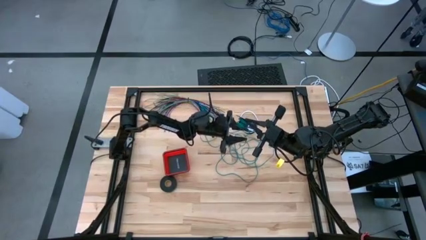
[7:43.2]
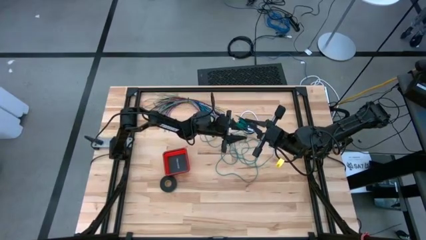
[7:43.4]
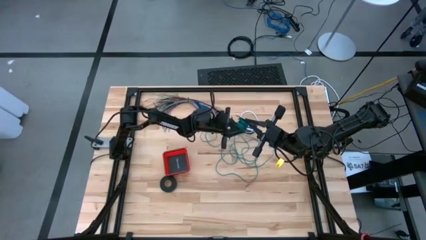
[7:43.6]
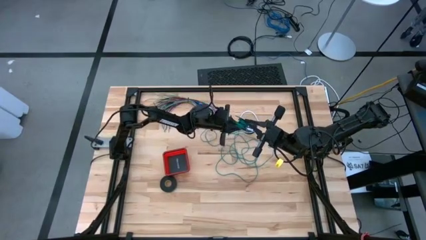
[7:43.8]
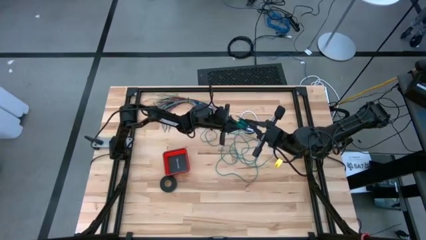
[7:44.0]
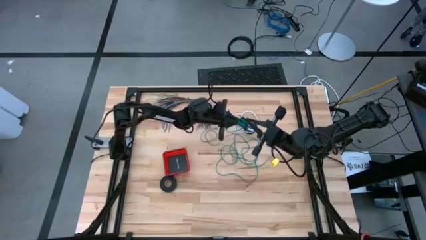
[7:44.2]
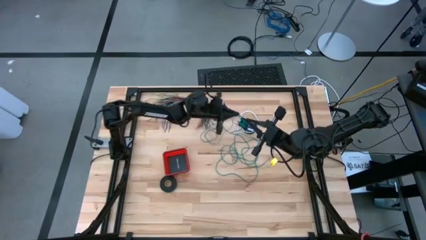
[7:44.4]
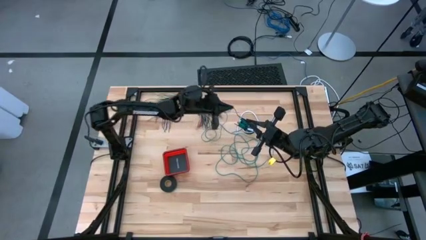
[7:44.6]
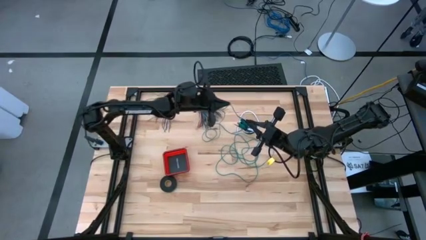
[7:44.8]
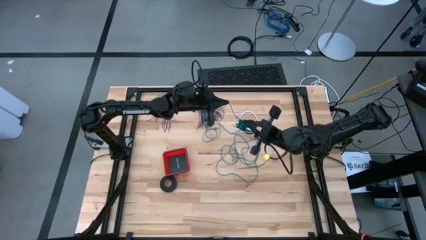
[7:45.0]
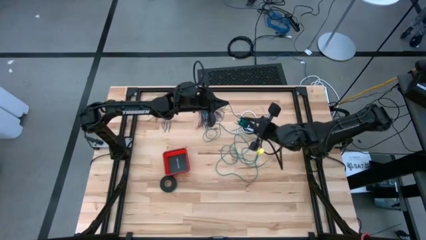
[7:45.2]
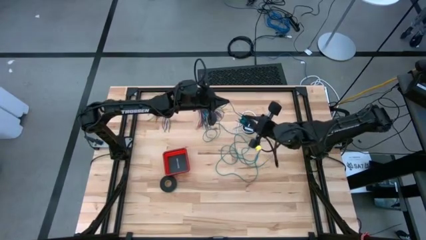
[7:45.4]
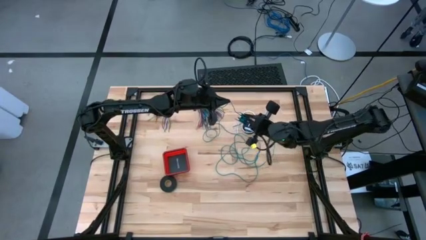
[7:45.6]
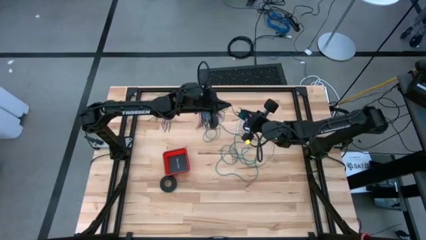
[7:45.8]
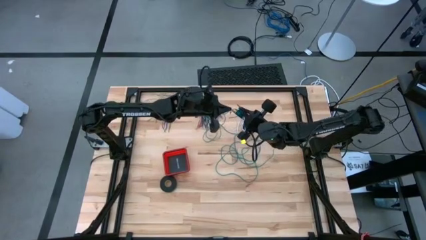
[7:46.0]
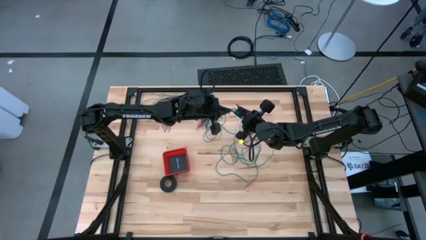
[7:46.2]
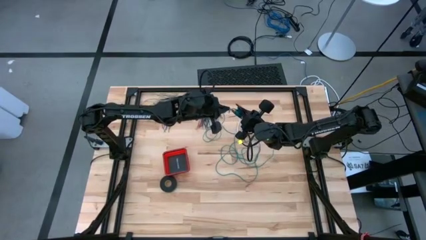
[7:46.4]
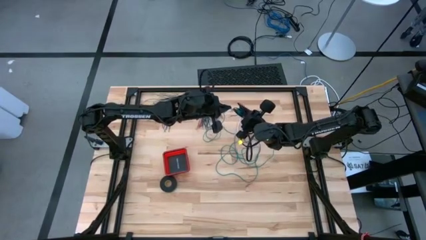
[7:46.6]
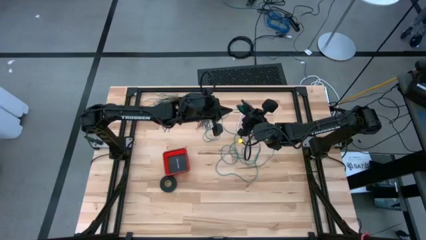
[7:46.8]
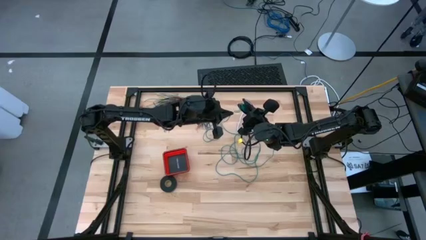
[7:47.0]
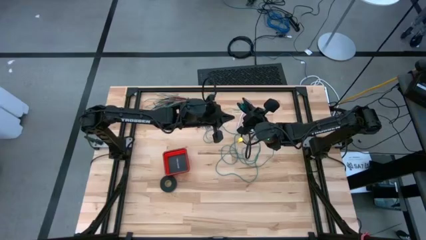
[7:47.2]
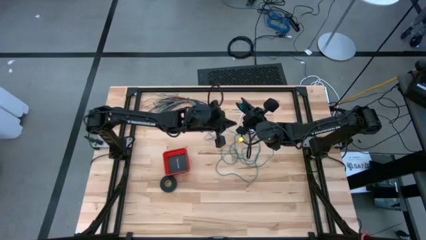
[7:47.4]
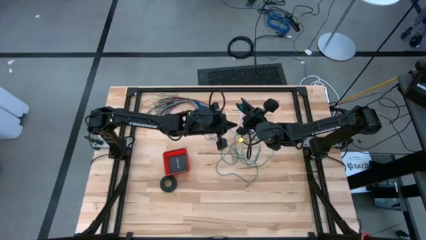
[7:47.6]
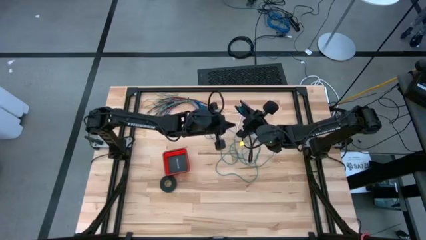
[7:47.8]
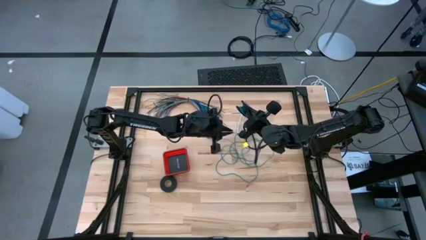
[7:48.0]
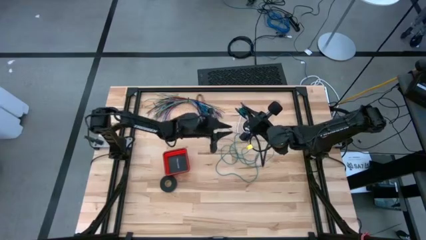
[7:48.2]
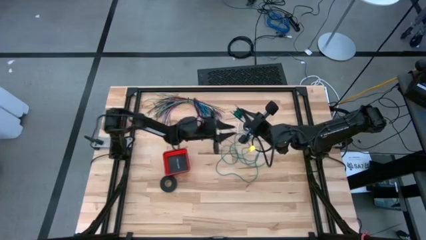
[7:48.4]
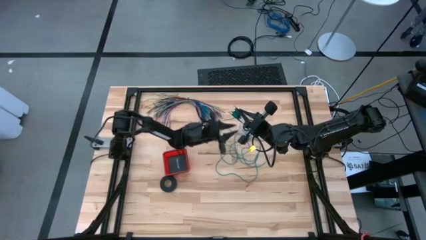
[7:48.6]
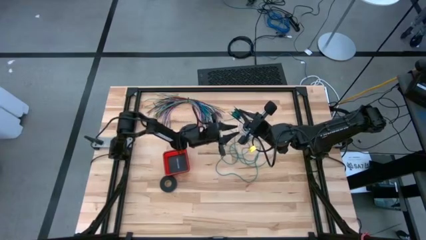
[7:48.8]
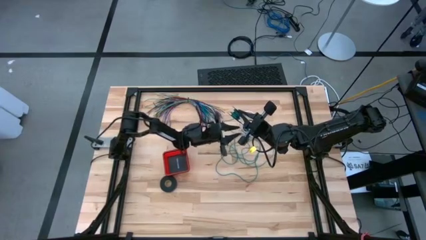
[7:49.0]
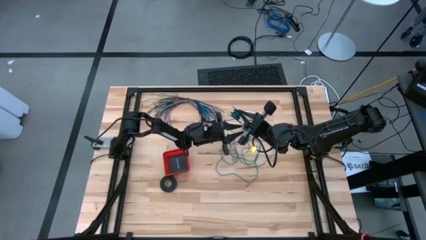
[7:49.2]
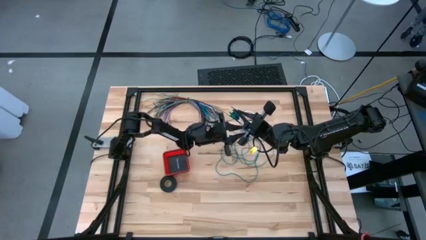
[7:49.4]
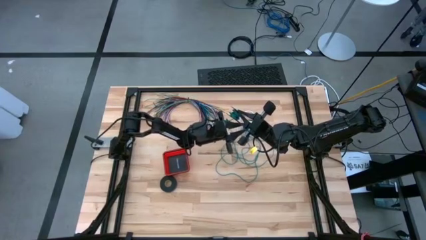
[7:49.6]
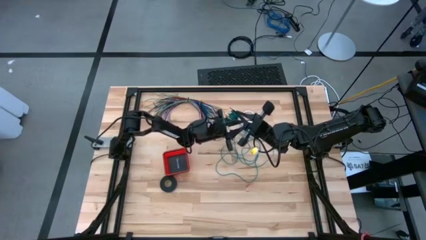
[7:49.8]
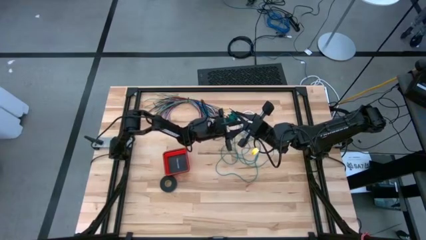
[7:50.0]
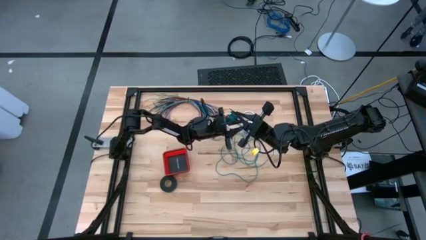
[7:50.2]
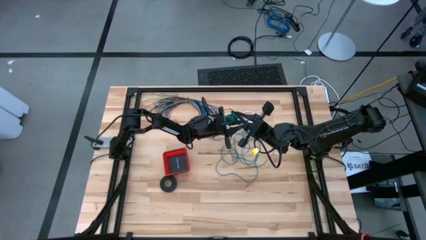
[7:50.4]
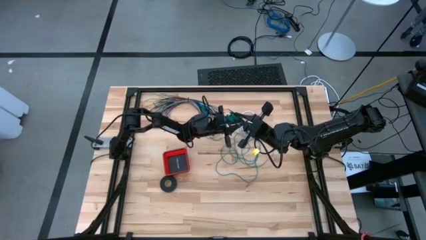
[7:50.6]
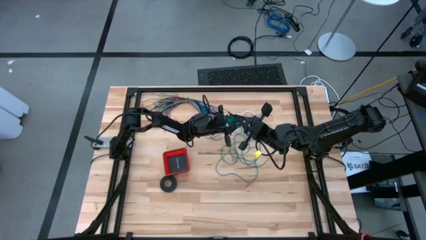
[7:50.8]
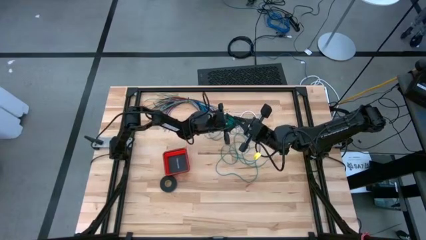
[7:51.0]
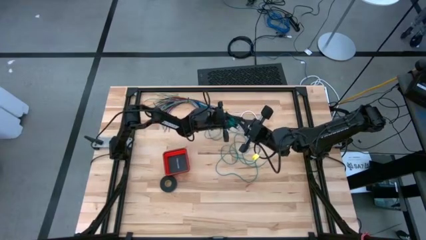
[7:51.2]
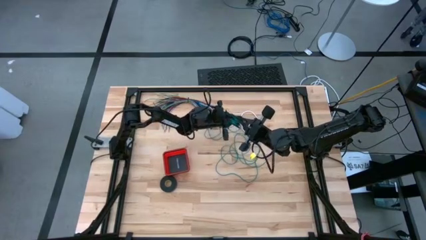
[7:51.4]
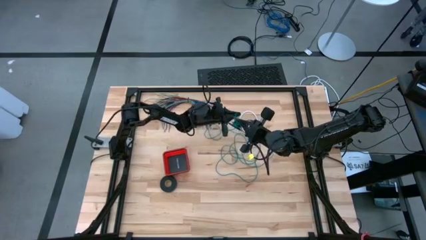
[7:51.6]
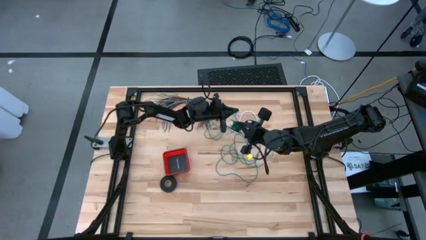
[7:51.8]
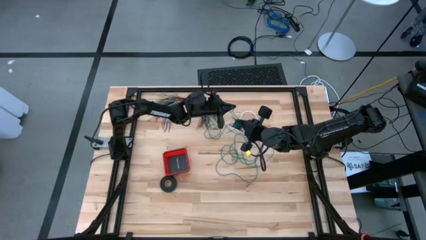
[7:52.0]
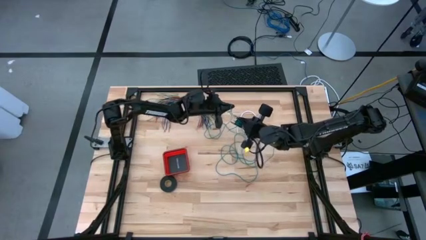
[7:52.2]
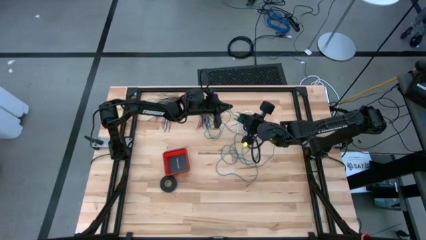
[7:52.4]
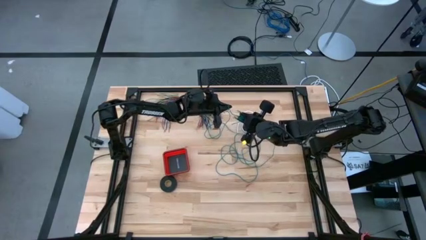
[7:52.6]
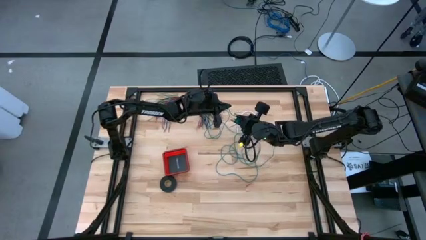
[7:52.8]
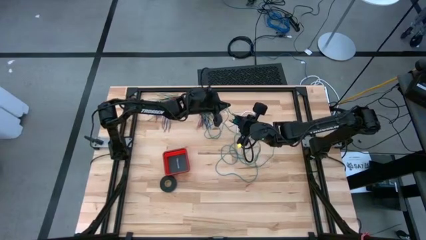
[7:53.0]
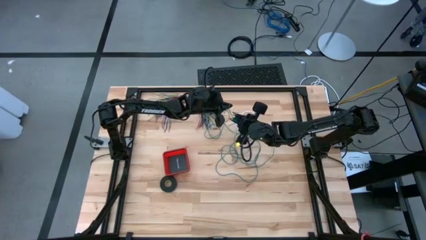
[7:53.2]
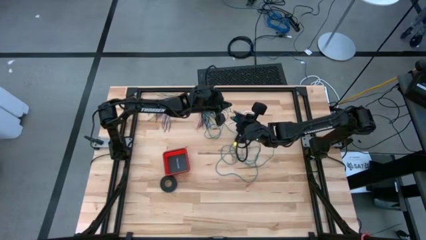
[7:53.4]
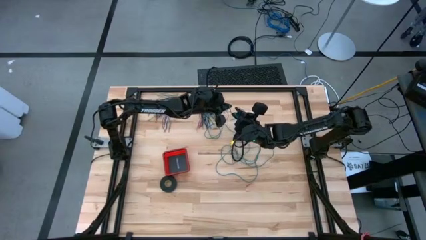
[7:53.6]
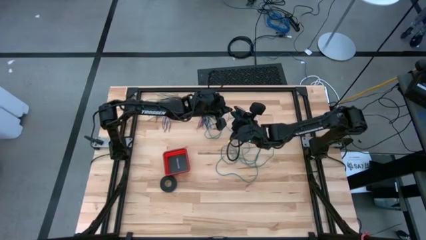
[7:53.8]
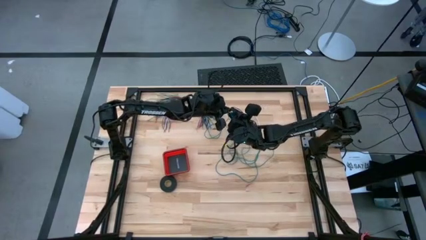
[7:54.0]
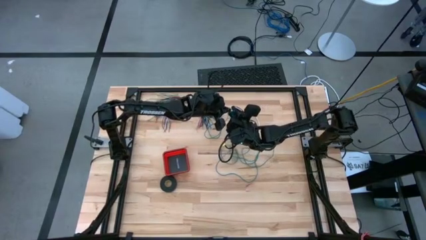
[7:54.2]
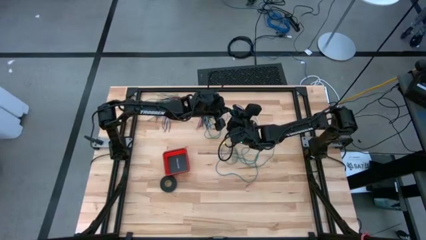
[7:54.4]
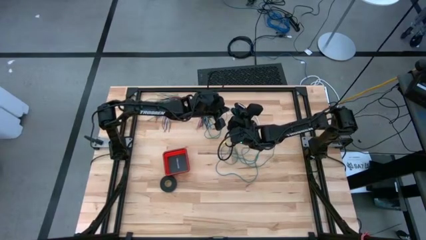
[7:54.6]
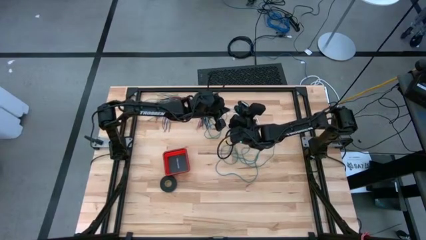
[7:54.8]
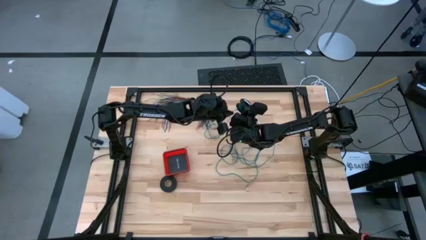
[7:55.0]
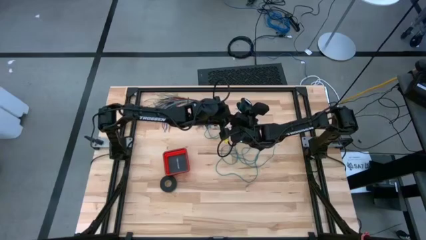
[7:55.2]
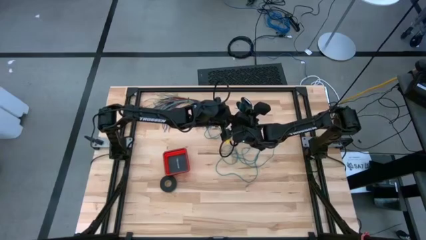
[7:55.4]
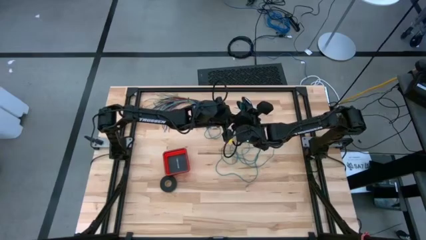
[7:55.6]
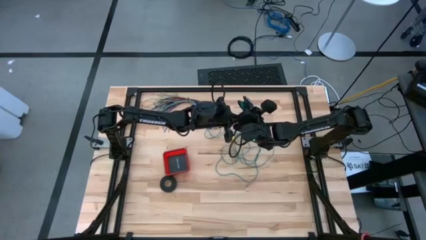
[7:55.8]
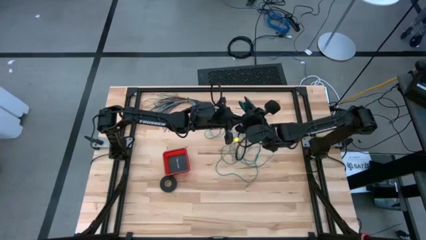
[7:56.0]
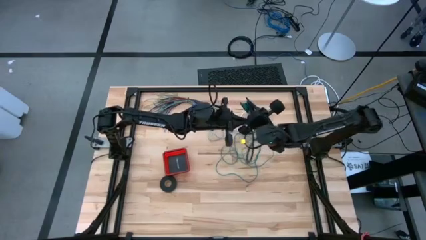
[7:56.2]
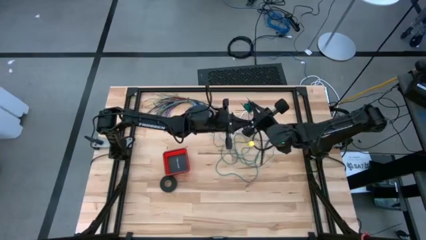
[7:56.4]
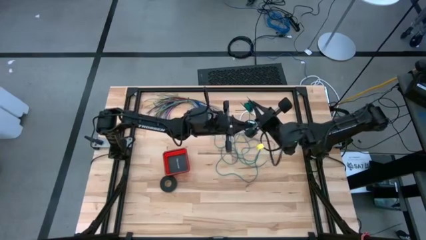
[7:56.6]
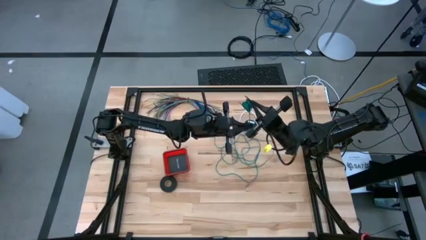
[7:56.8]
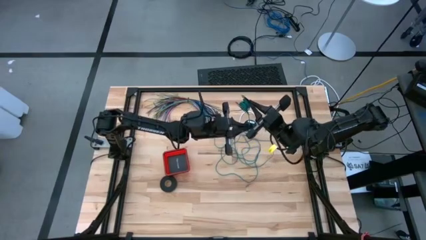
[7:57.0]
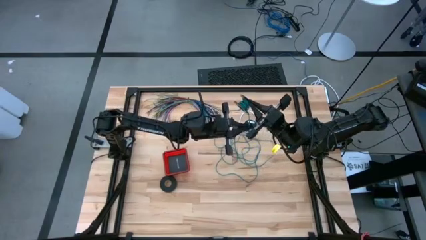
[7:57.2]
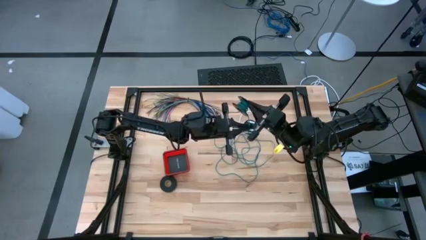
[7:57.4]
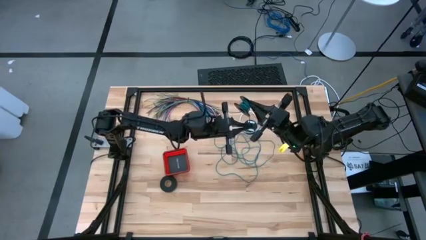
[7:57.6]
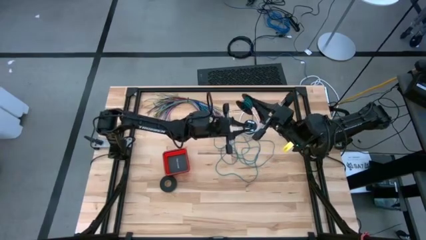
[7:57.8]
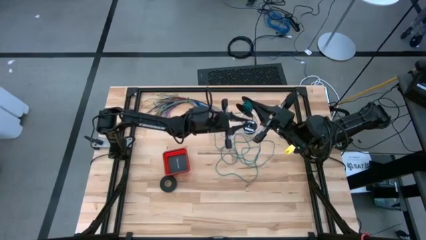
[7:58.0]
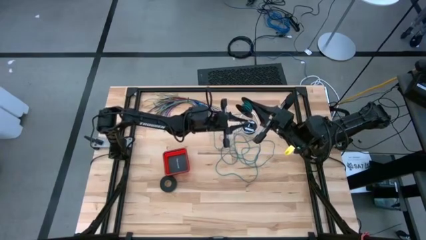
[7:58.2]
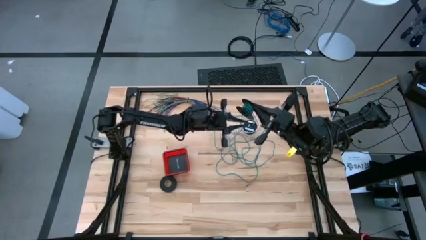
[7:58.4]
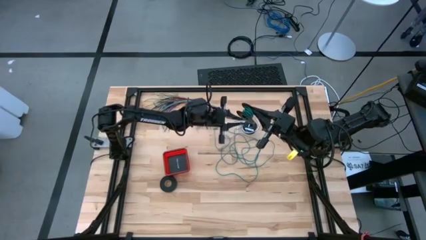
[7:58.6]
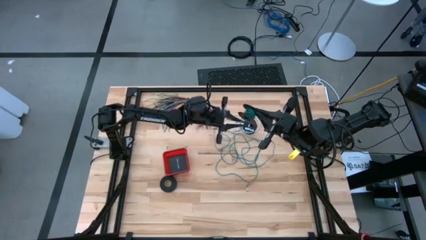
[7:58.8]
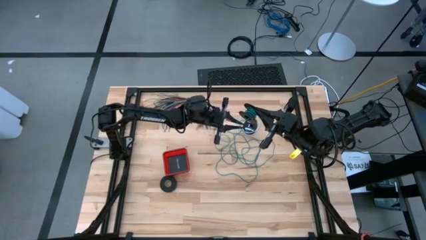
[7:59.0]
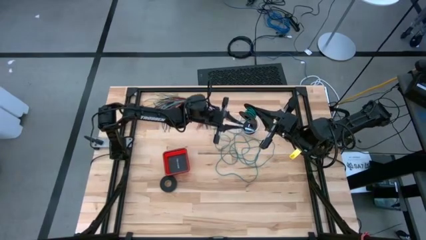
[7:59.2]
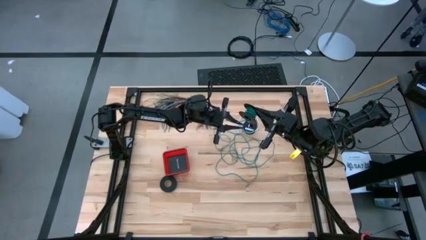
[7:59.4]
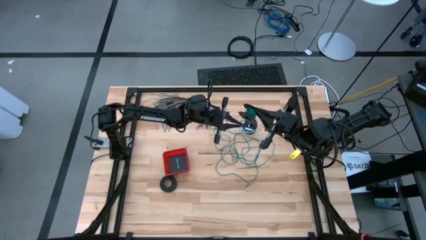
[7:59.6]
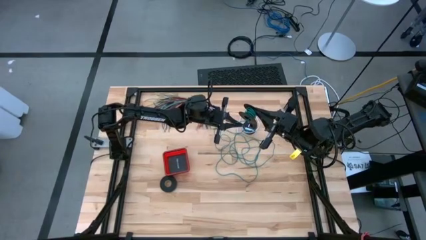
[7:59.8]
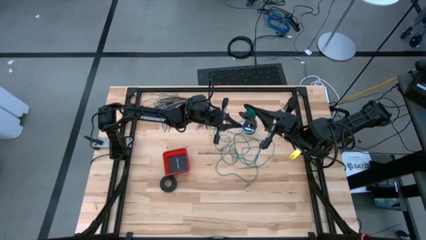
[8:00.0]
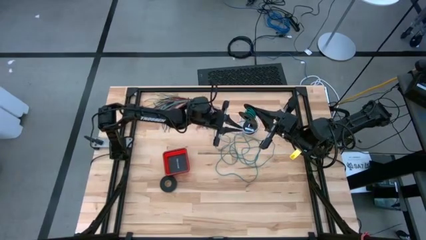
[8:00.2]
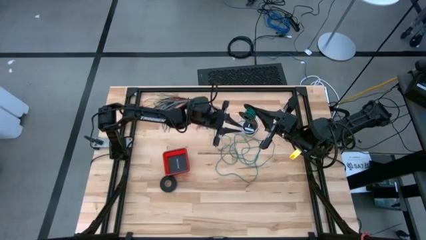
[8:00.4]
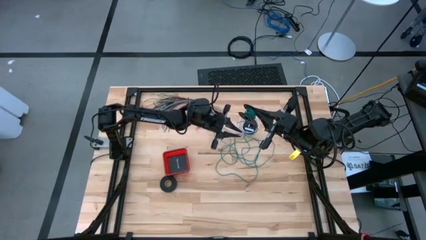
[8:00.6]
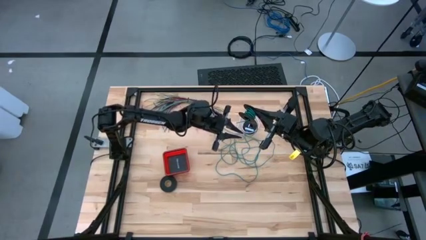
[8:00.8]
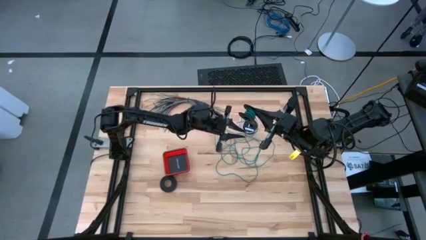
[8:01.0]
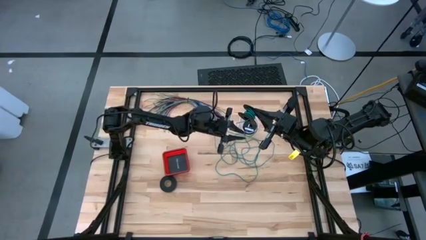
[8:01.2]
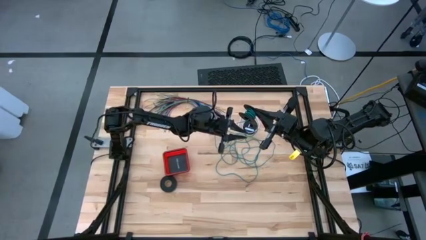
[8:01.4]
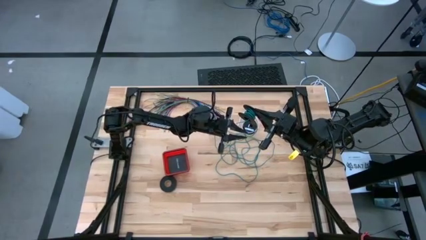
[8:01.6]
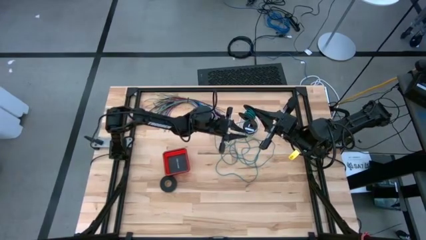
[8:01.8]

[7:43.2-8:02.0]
Task: Coil cords
Coil the green wire onto the spool
